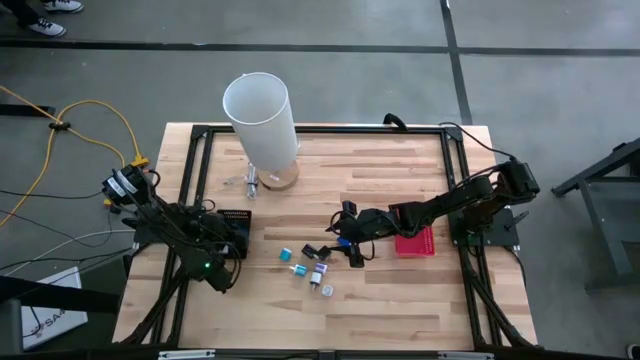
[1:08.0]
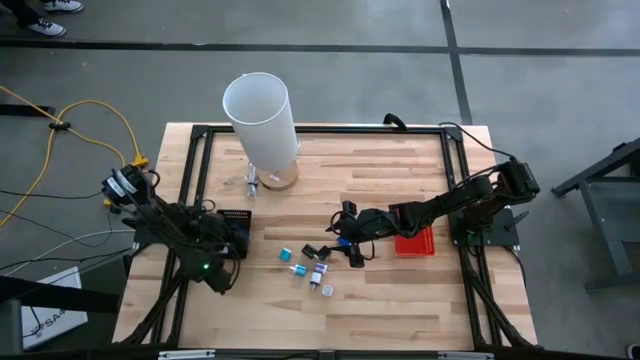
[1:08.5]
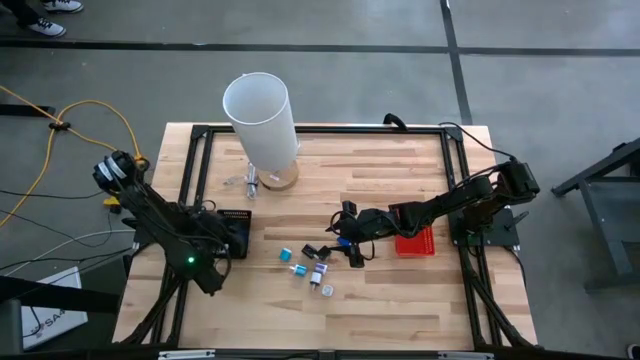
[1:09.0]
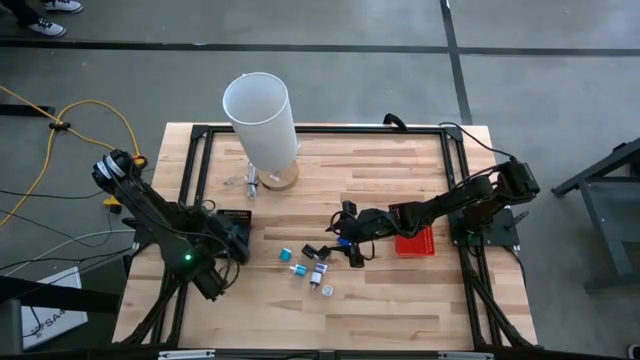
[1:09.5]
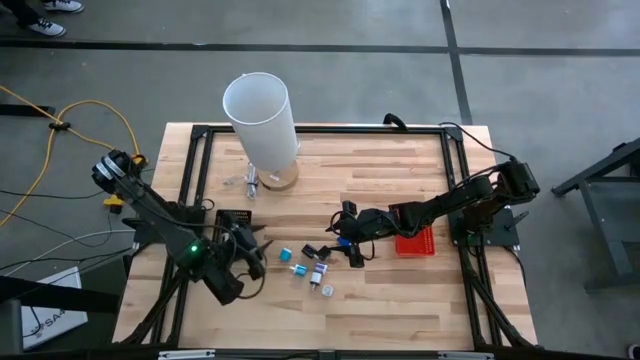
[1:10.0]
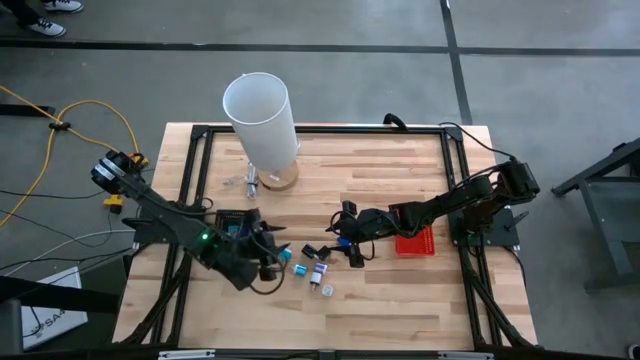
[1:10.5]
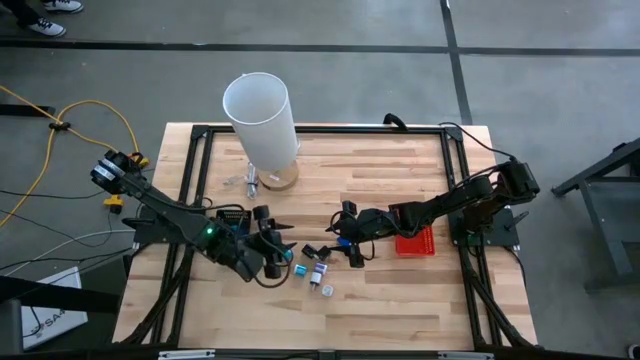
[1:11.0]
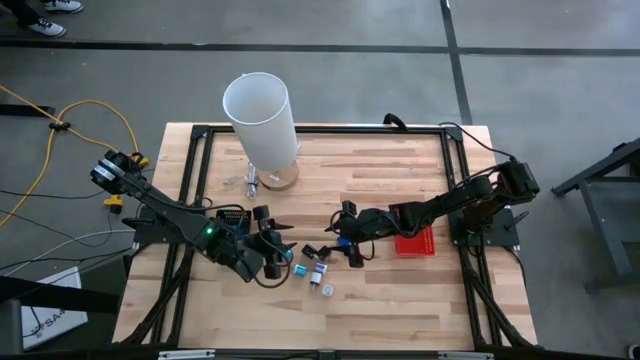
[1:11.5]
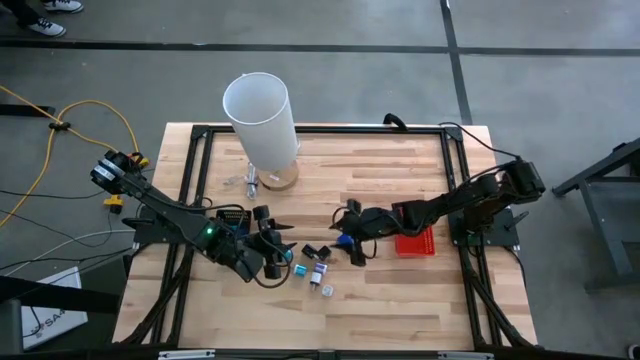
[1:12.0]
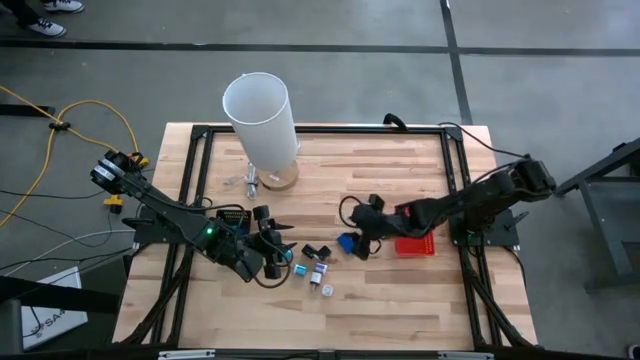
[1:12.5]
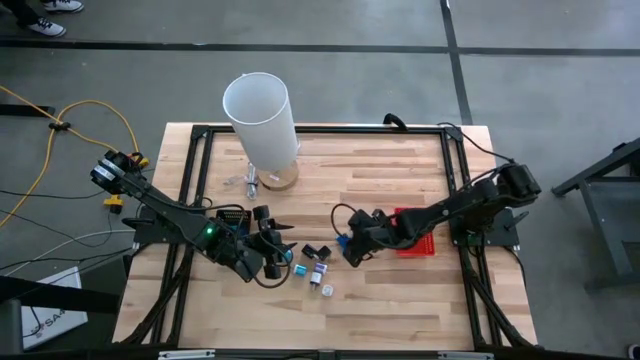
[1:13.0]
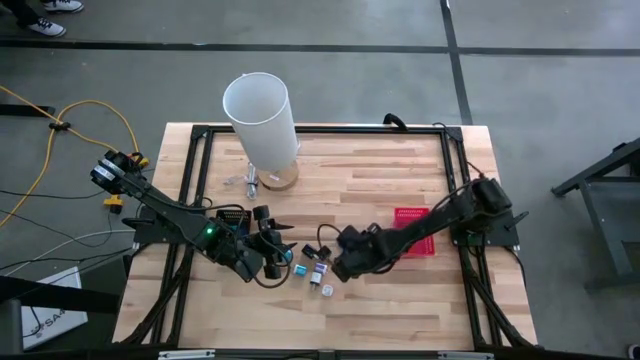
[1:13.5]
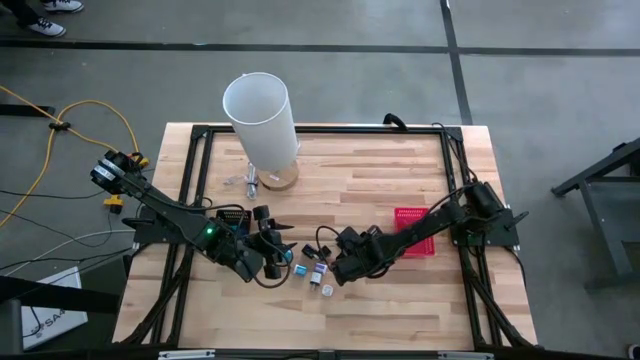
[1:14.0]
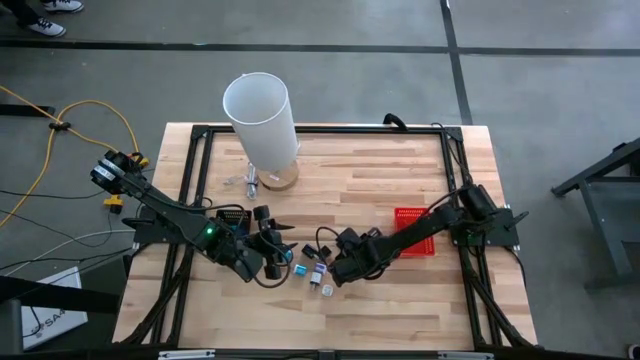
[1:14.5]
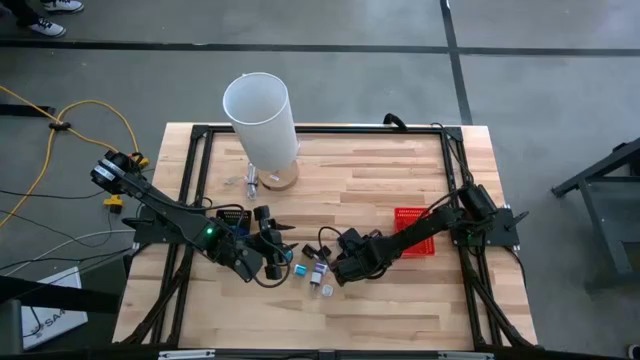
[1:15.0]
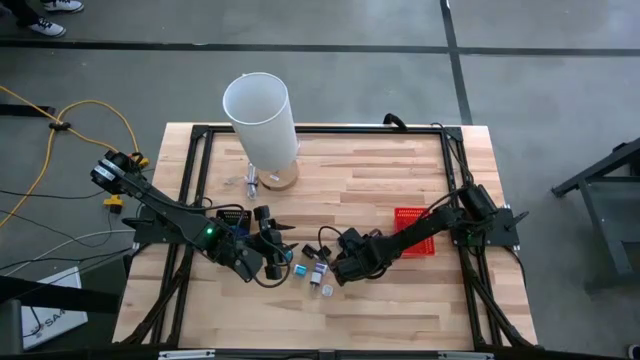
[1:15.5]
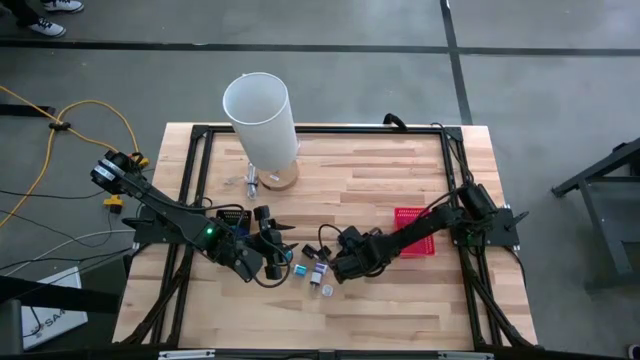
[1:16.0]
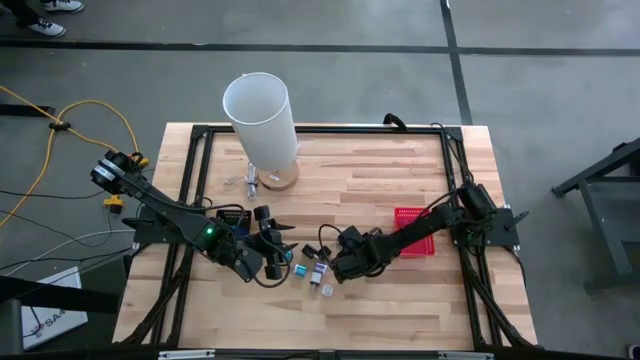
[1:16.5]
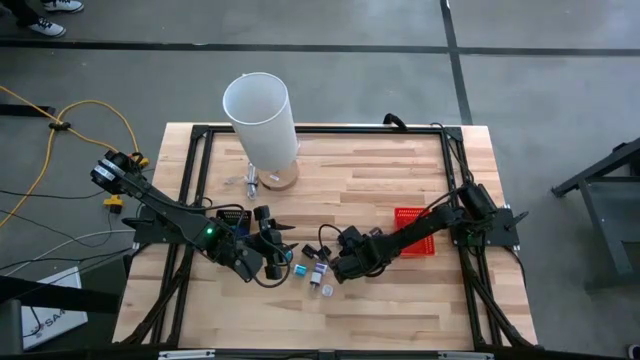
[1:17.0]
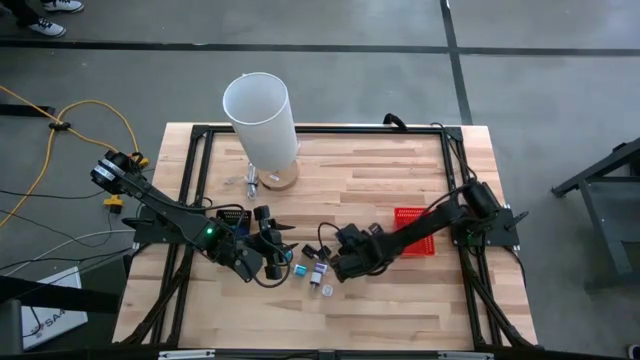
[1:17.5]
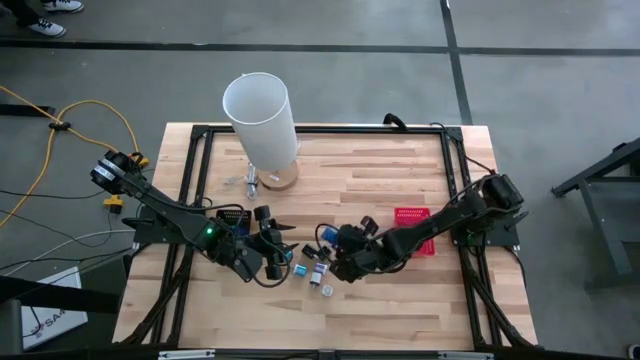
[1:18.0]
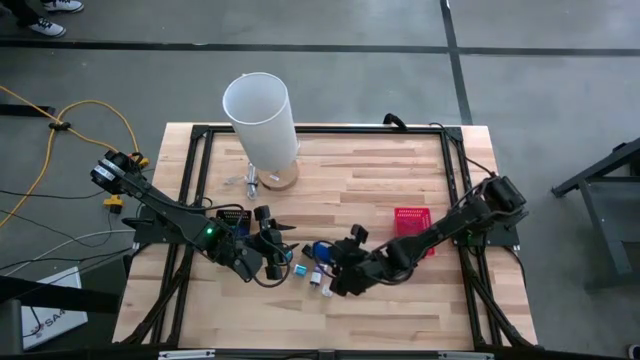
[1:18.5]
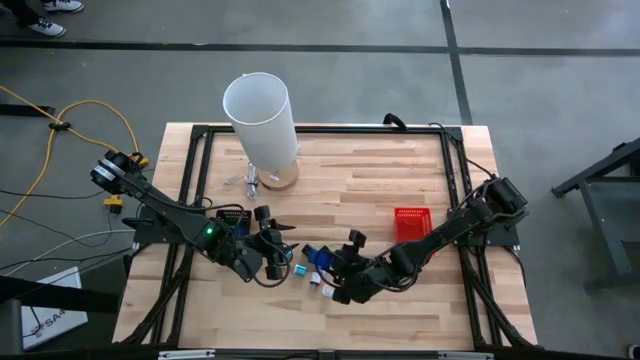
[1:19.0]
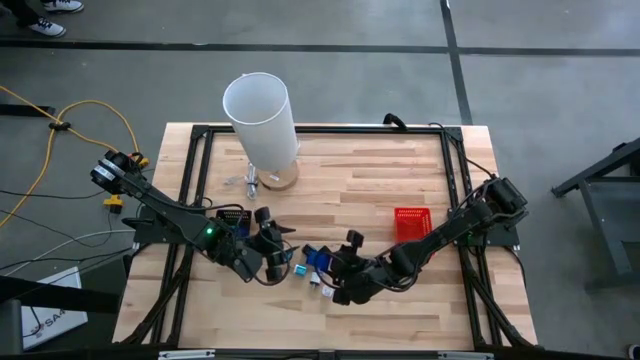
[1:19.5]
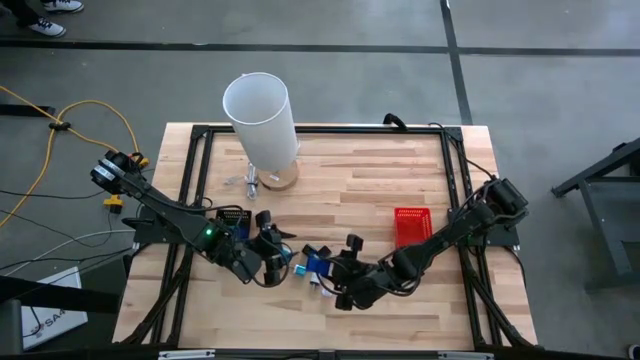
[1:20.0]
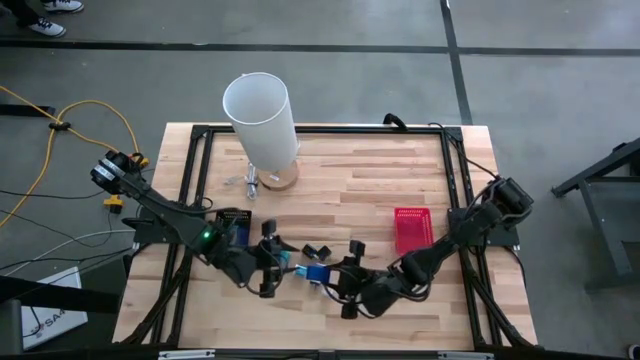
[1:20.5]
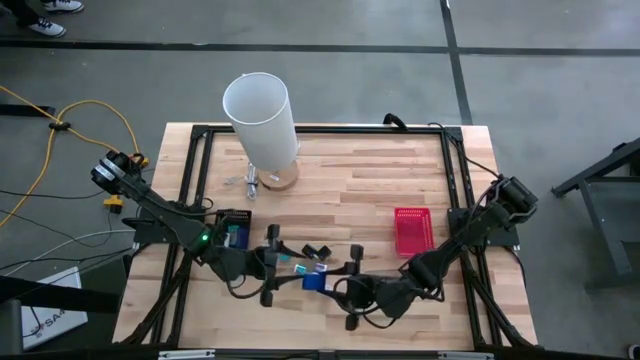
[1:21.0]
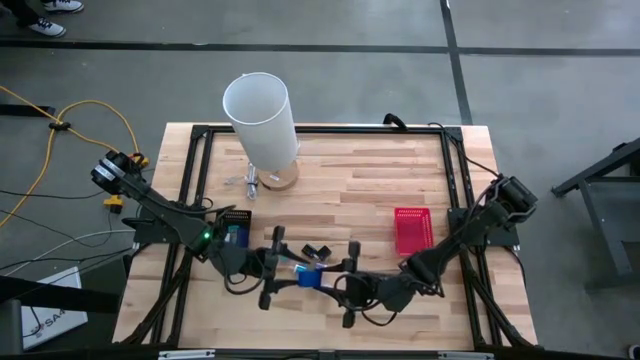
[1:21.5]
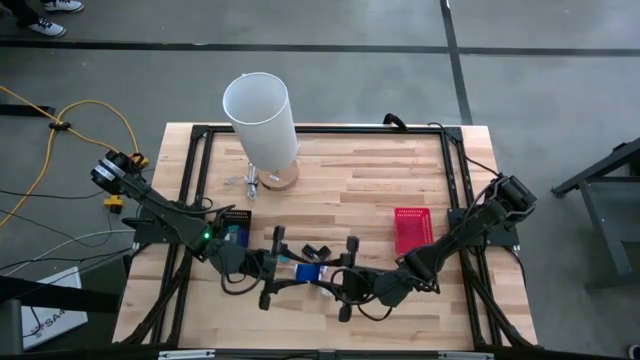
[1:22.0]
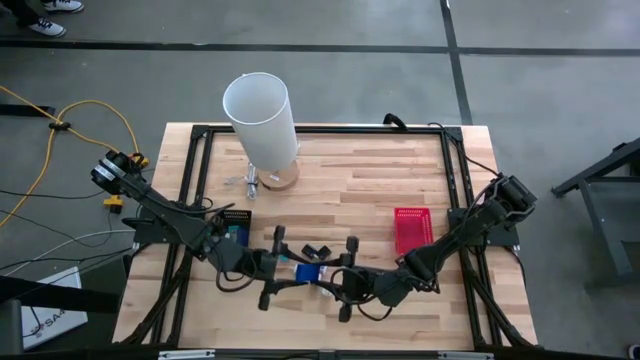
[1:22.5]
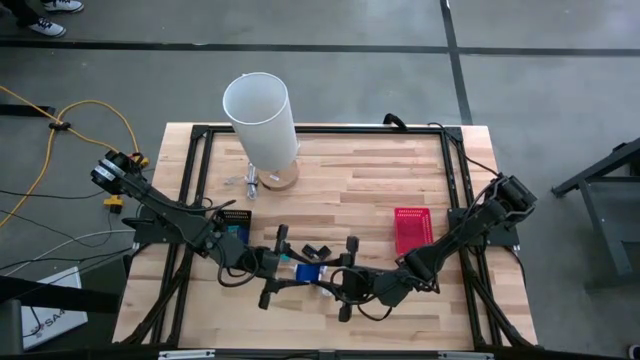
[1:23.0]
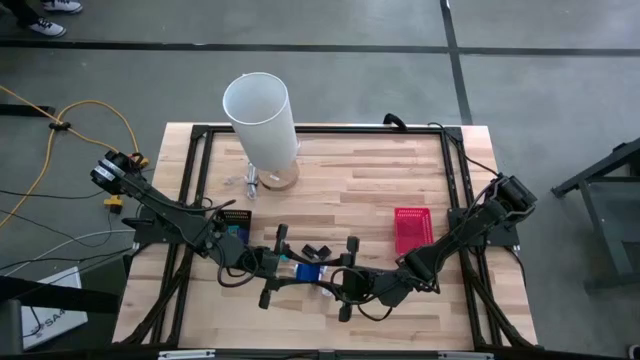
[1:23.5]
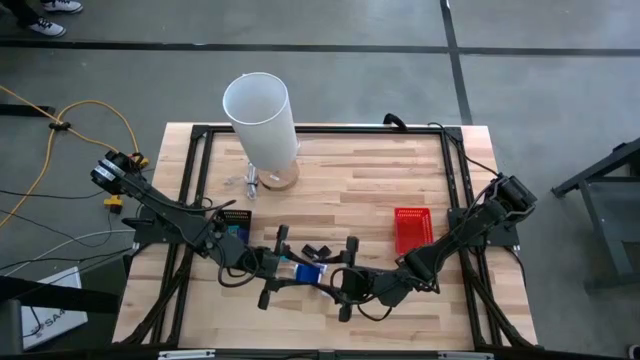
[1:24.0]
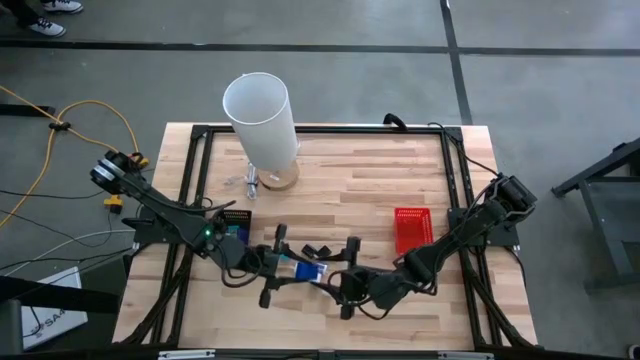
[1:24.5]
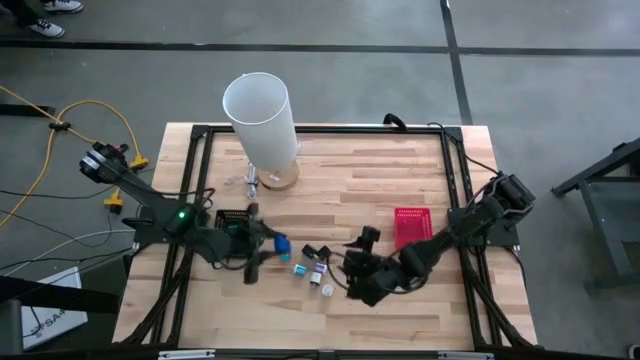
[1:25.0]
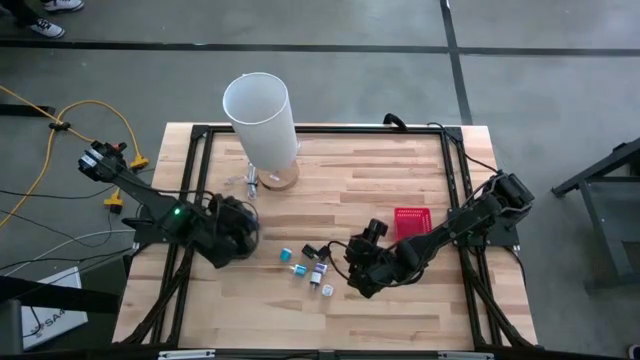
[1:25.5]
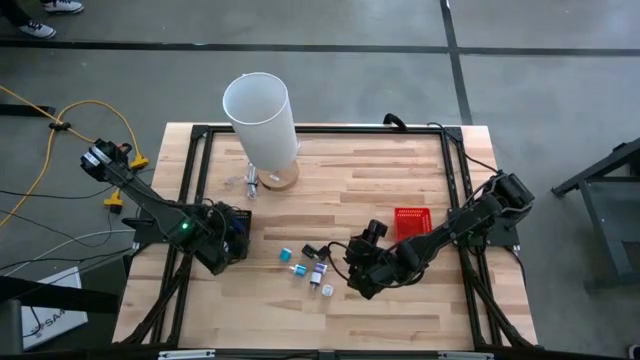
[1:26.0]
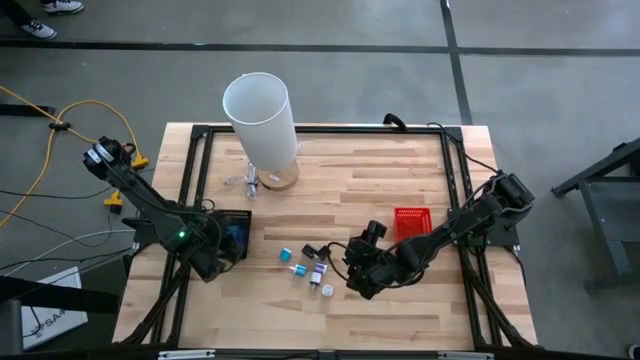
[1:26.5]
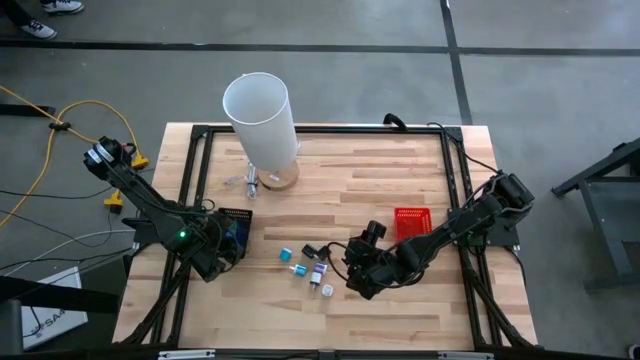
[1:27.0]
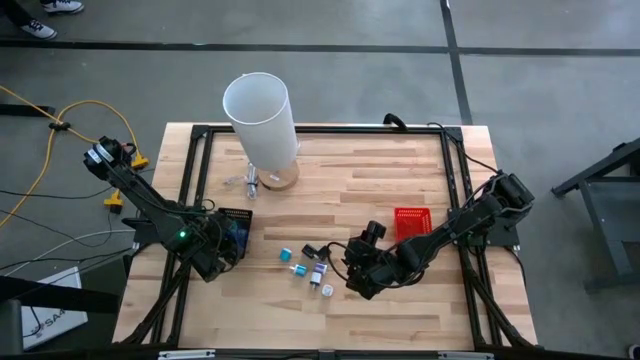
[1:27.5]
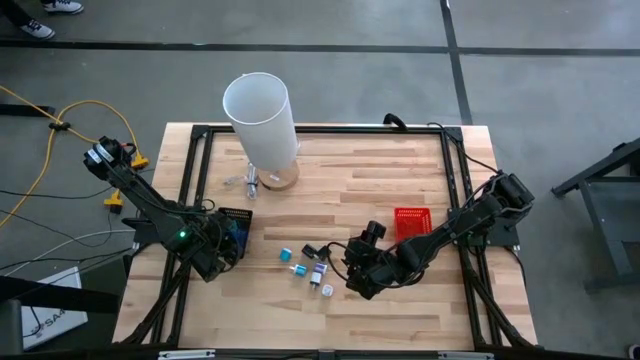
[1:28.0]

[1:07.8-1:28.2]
Task: Pick & Place Office items
Put the dark blue digital timer into the black bin
